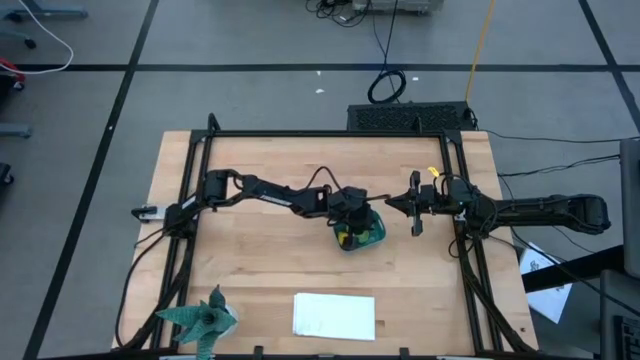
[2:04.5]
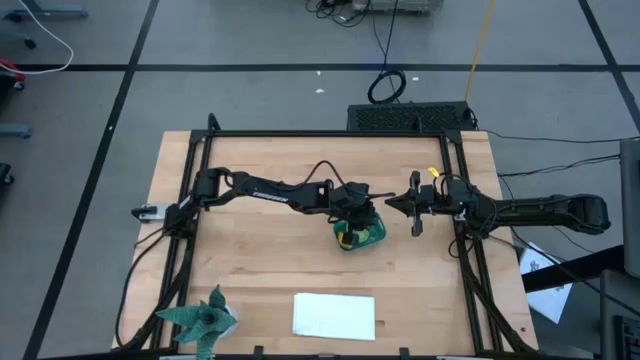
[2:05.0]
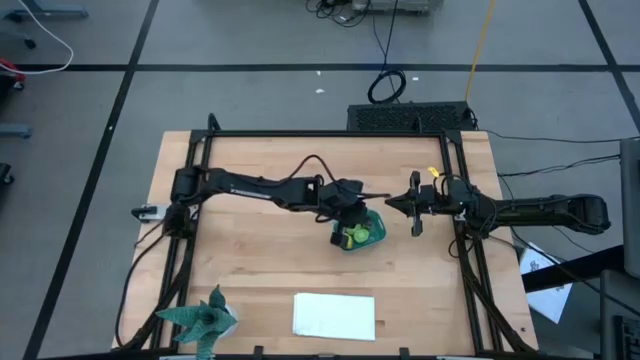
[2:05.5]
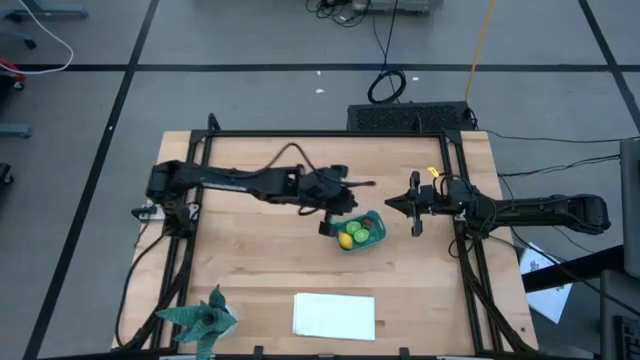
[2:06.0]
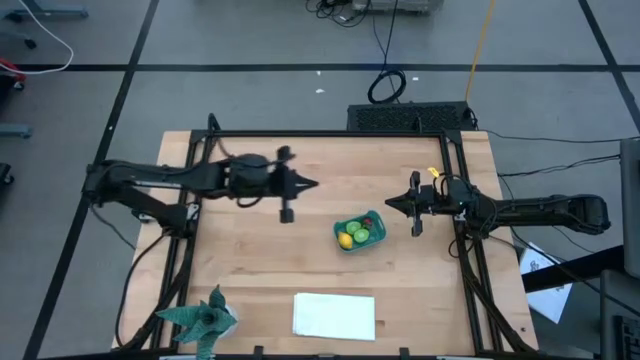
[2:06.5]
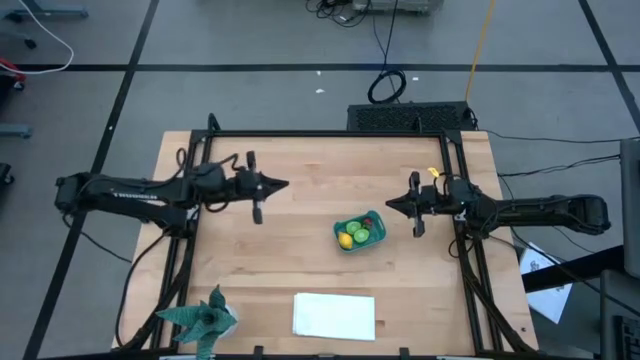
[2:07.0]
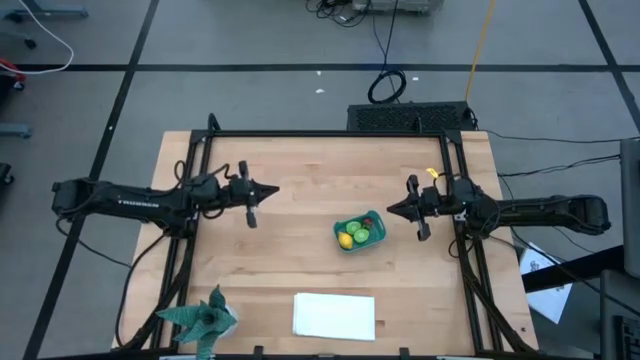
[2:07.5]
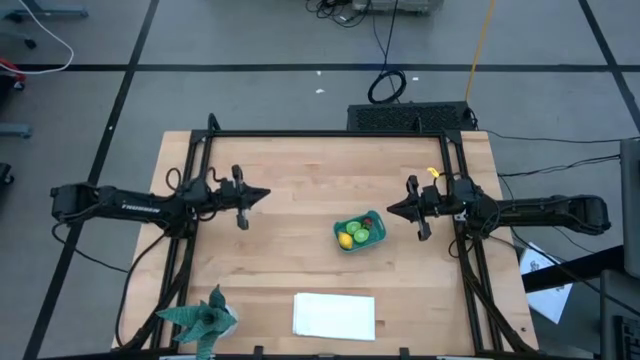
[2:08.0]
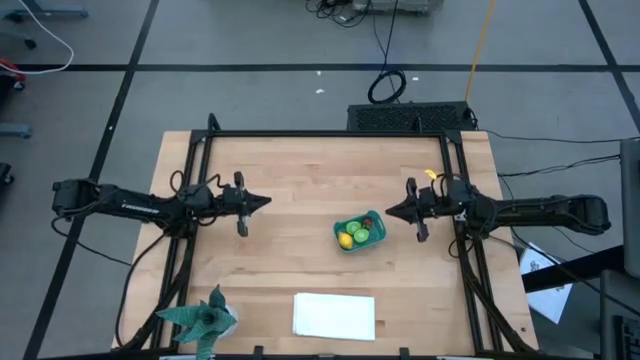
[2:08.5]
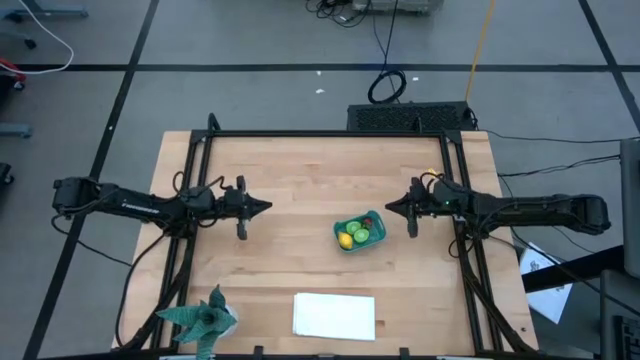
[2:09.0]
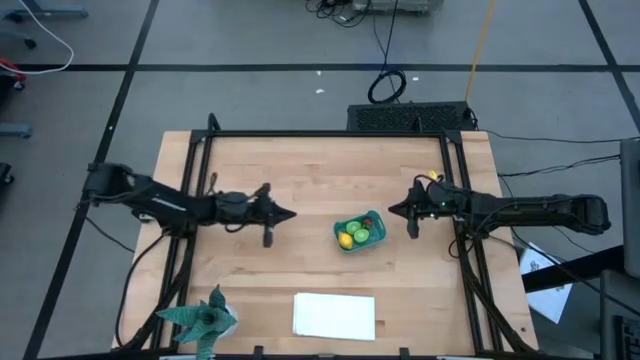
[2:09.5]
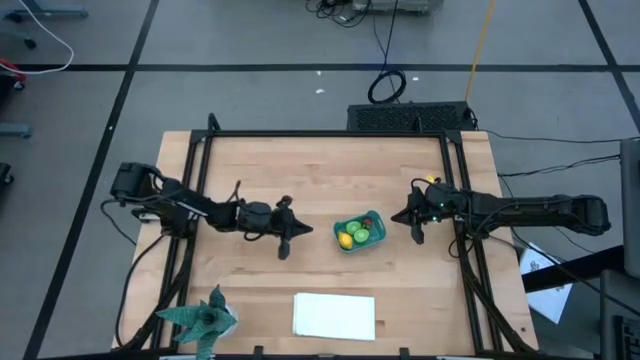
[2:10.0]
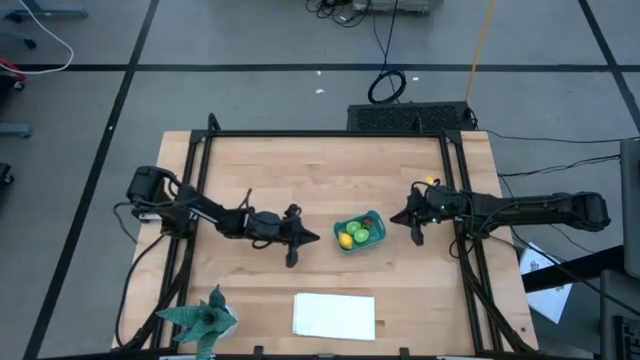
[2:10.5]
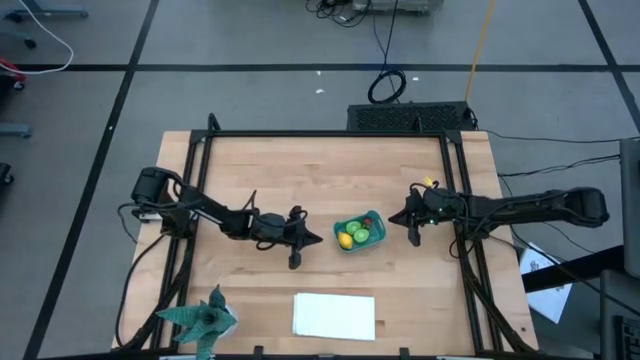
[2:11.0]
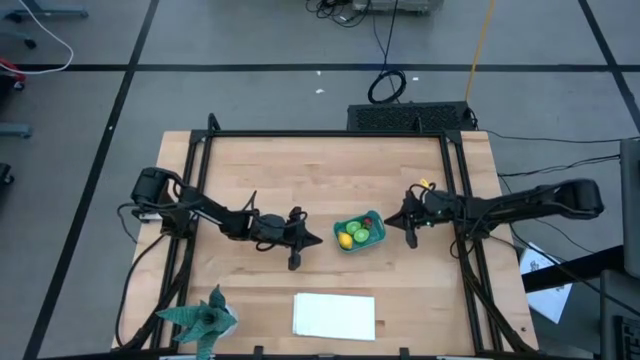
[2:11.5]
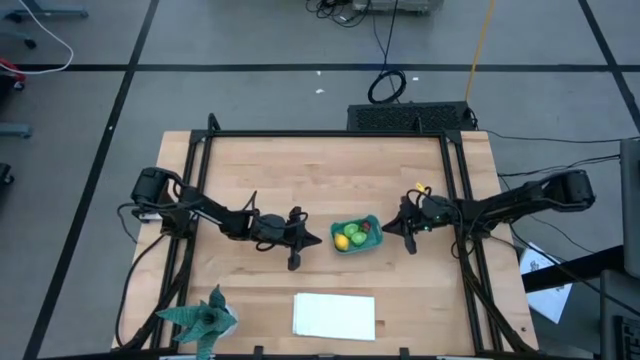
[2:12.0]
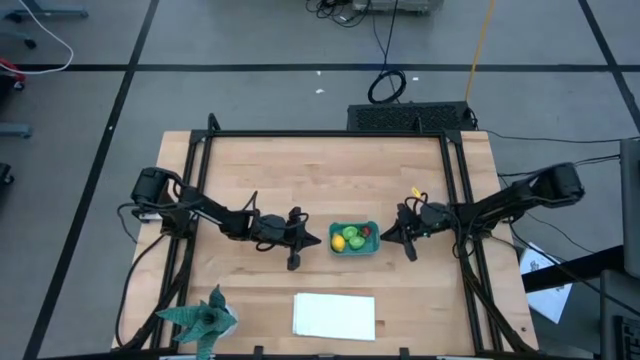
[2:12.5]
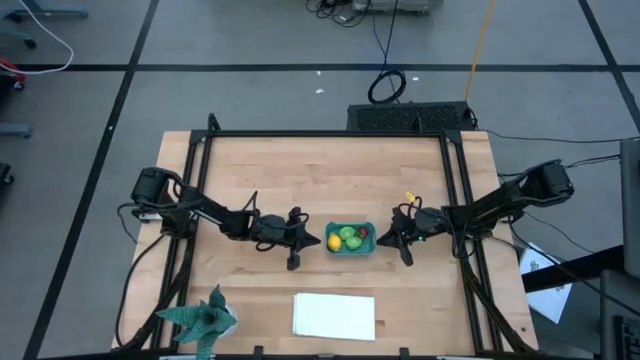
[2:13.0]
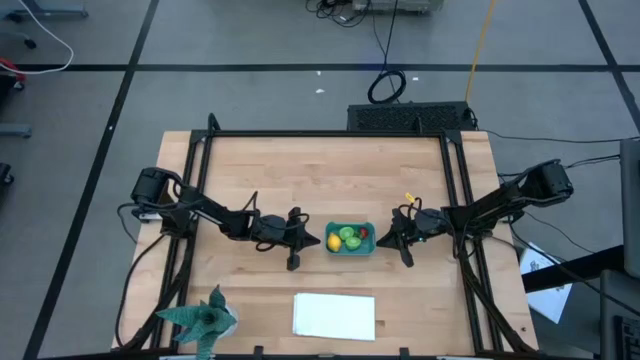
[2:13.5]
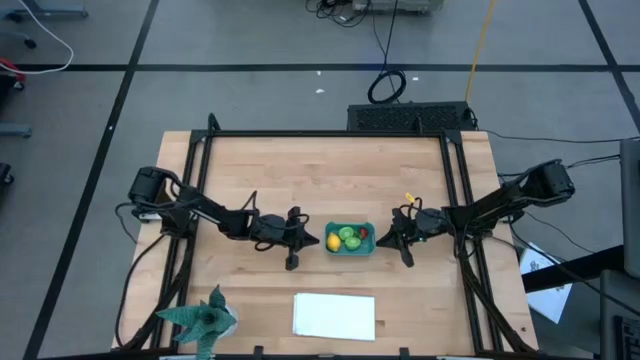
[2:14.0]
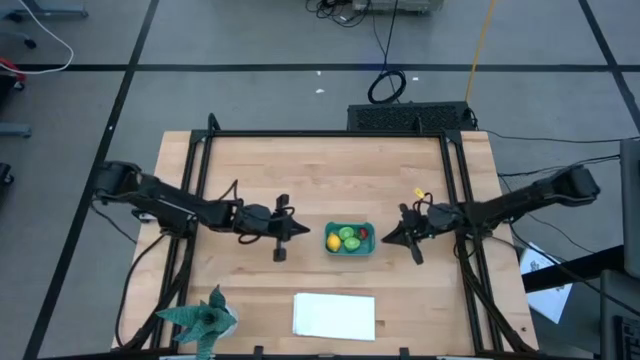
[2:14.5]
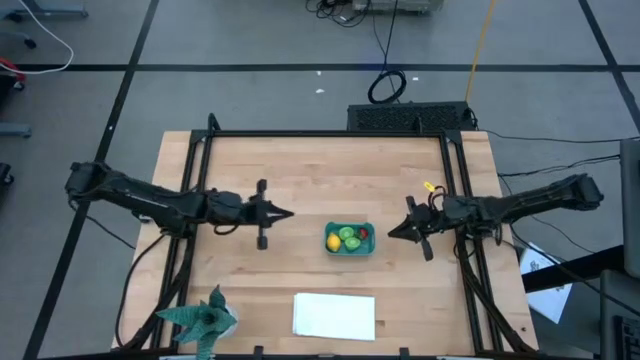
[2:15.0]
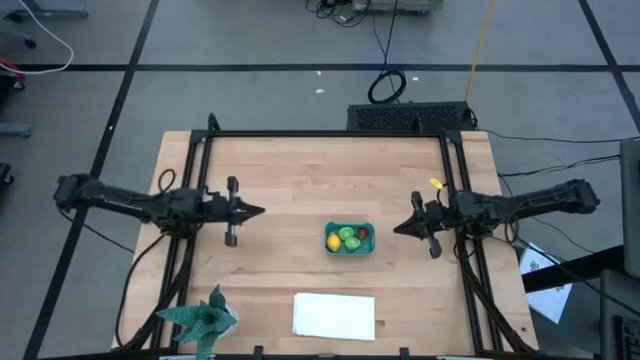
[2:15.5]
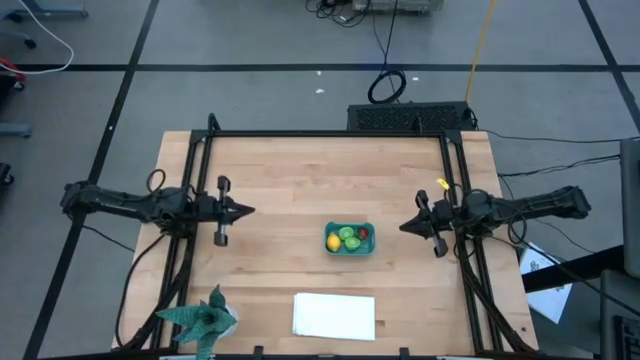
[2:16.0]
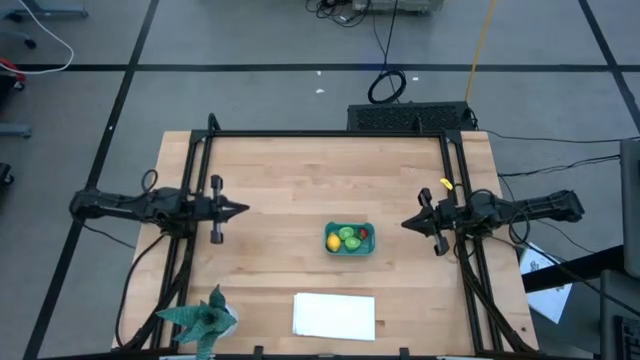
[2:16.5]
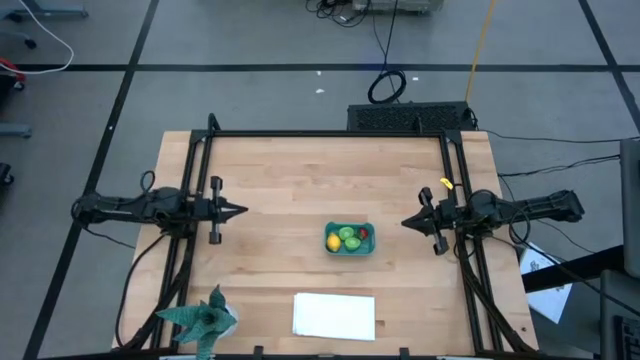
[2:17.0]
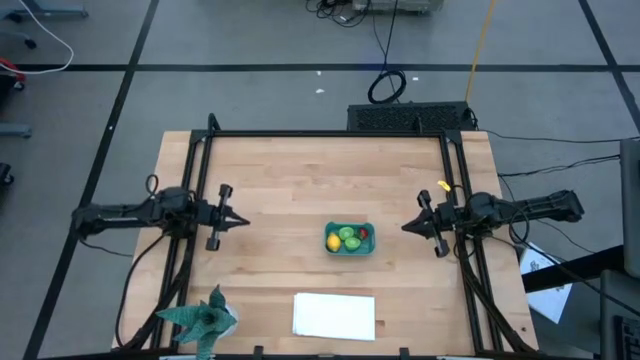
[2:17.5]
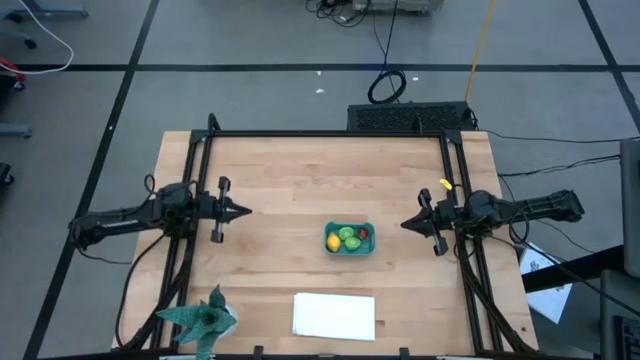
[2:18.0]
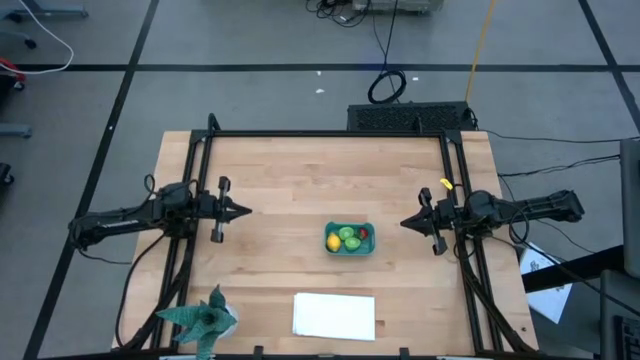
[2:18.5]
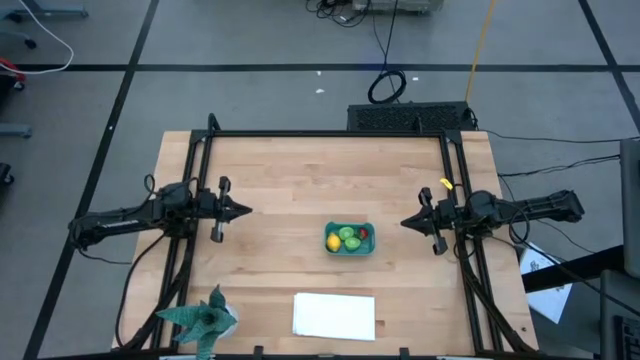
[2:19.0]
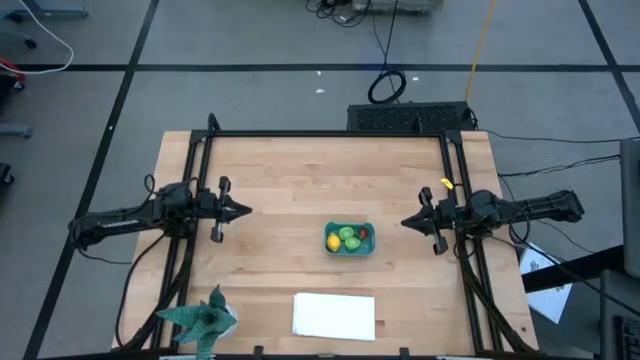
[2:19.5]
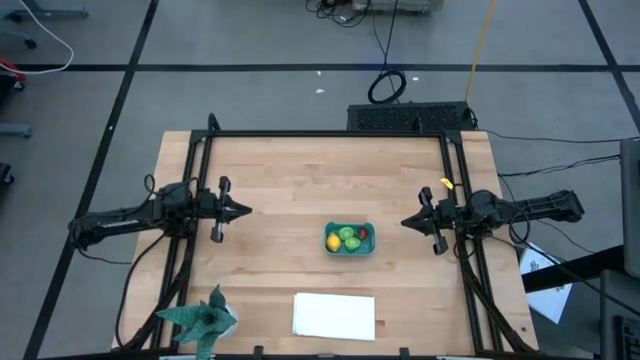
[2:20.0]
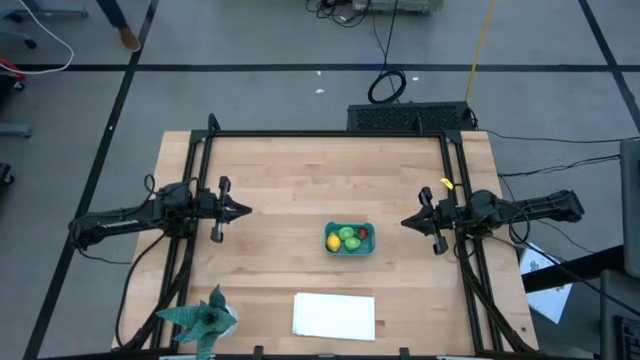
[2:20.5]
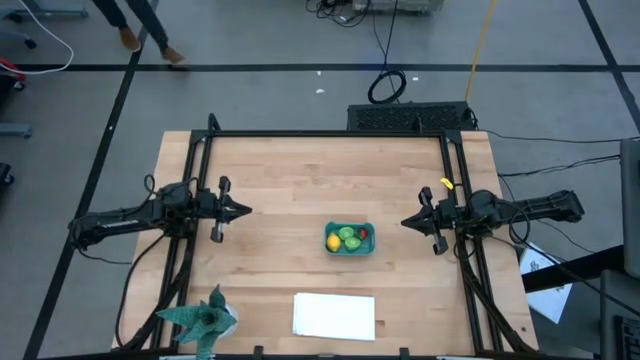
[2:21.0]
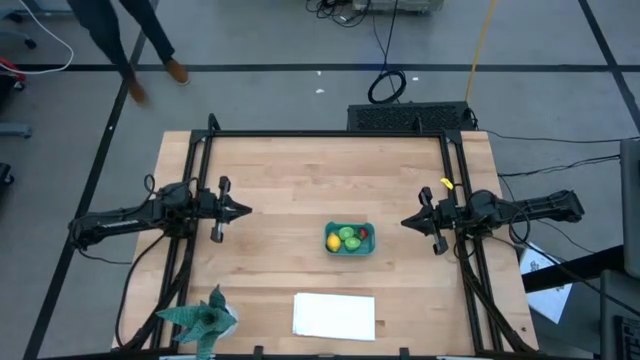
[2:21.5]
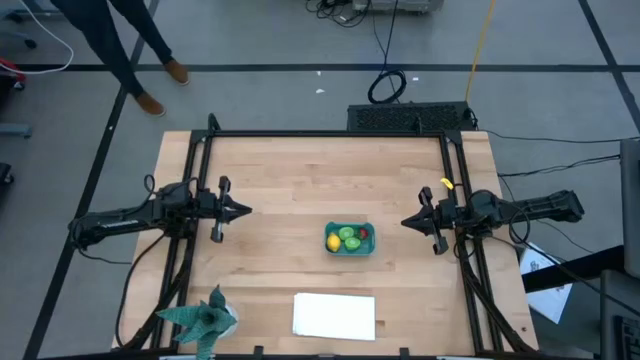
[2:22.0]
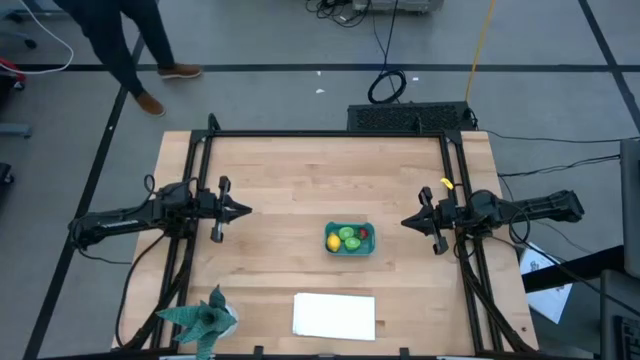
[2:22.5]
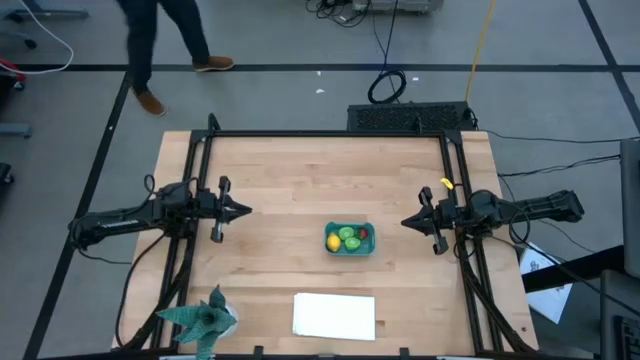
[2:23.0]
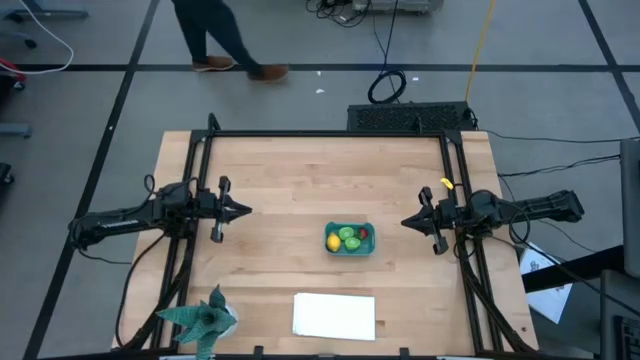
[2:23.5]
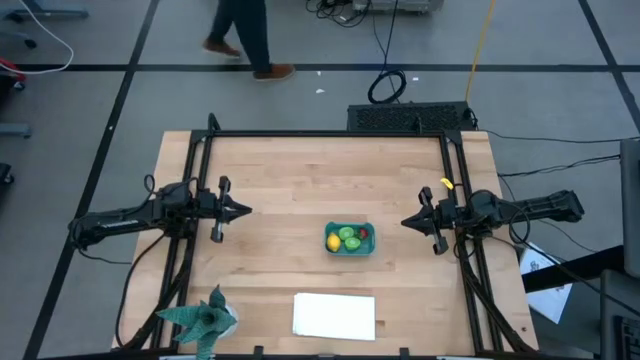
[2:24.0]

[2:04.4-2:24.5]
Task: Pick and placing Produce into tupperware
Return to Home Position

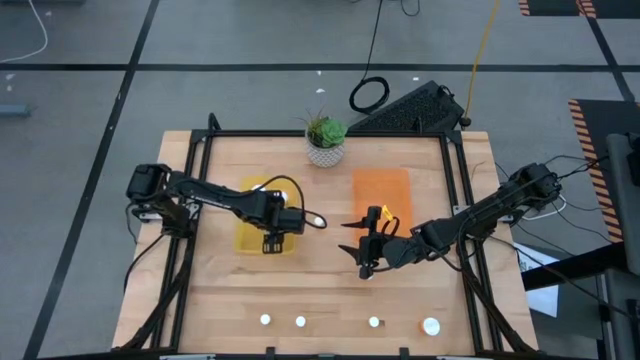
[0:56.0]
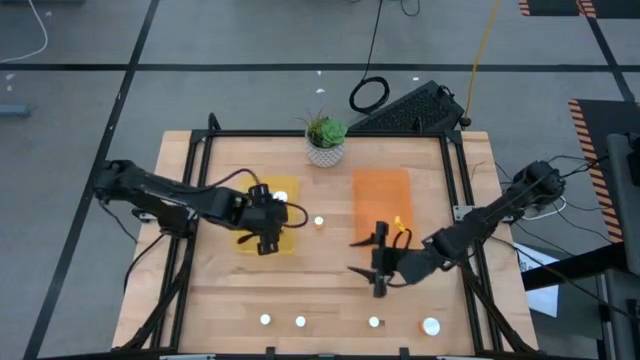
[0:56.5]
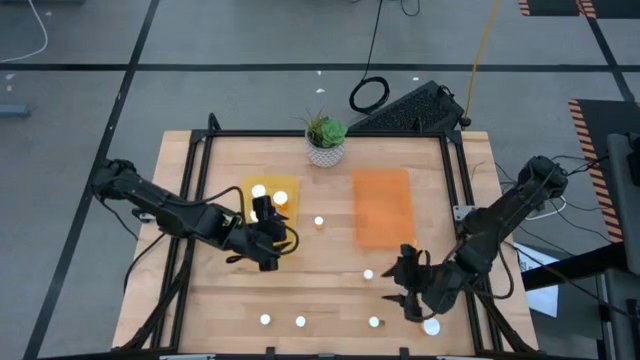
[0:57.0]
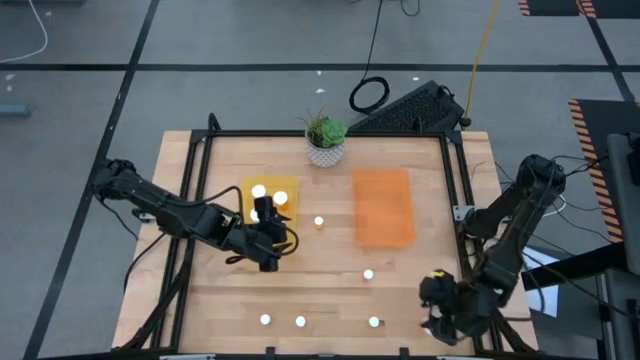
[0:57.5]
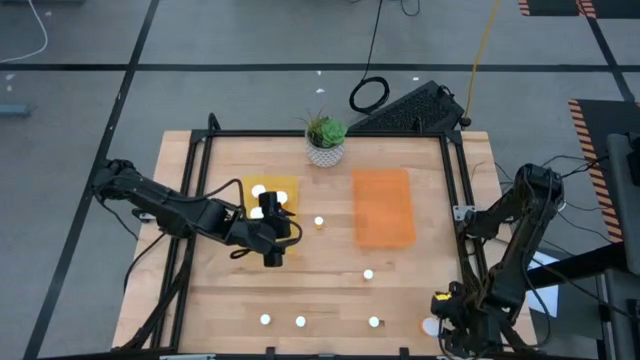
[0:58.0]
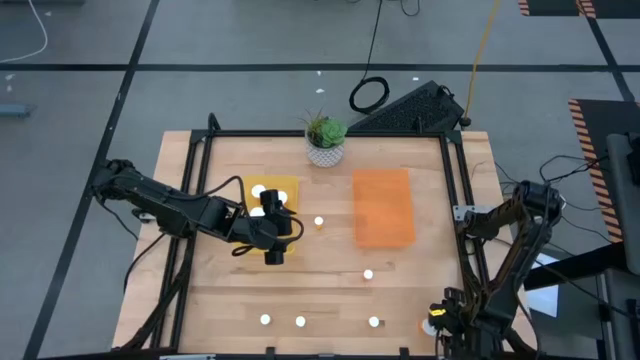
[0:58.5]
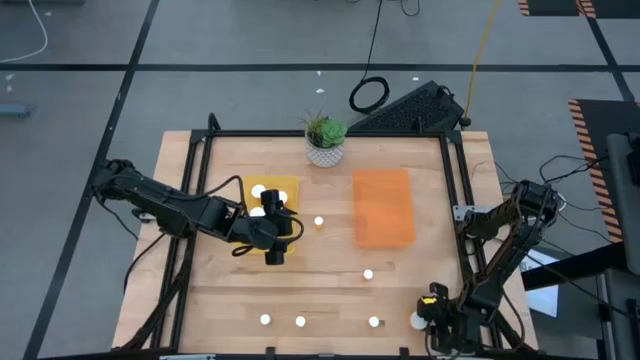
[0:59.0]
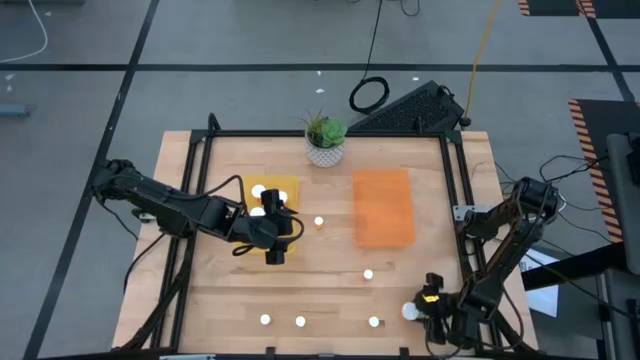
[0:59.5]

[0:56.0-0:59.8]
Task: Pick and place medicine bottles into bin by pill shape (circle, oval)
Put the large medicine bottle into the yellow bin
